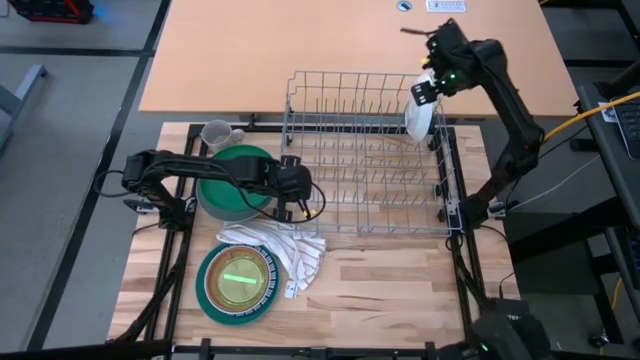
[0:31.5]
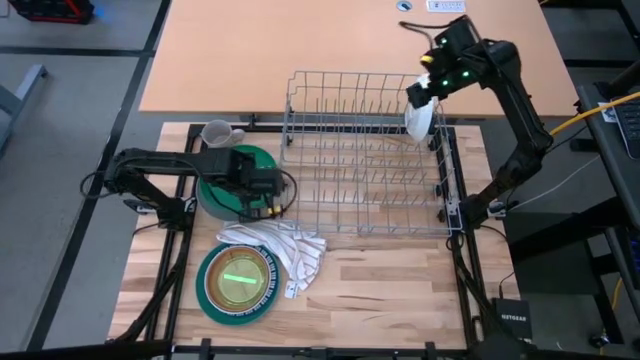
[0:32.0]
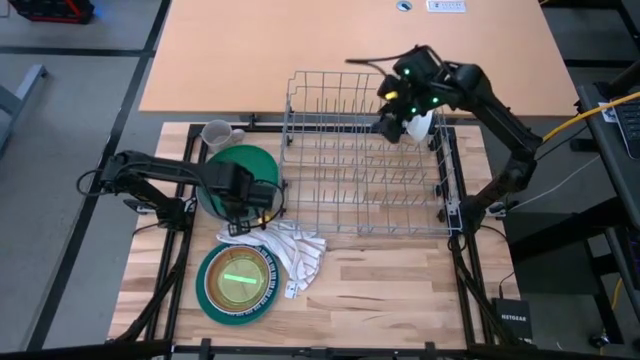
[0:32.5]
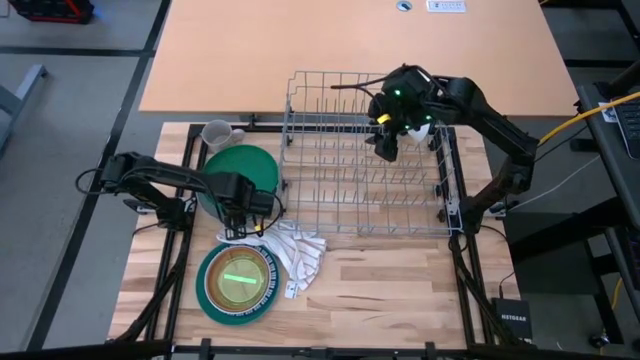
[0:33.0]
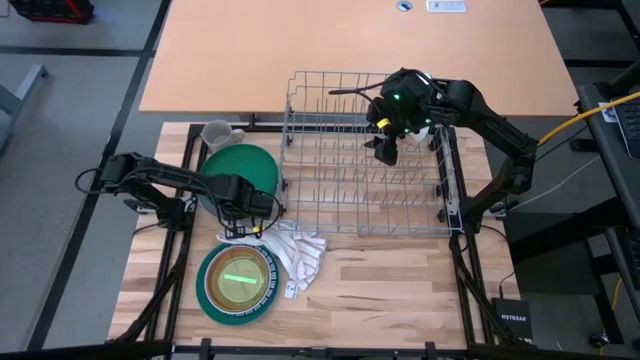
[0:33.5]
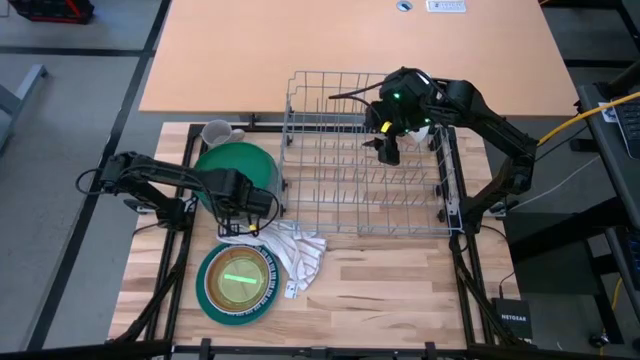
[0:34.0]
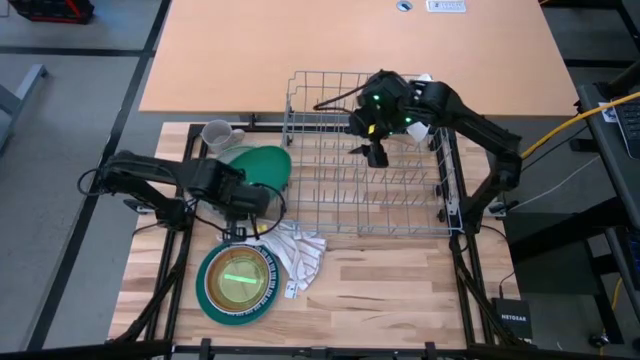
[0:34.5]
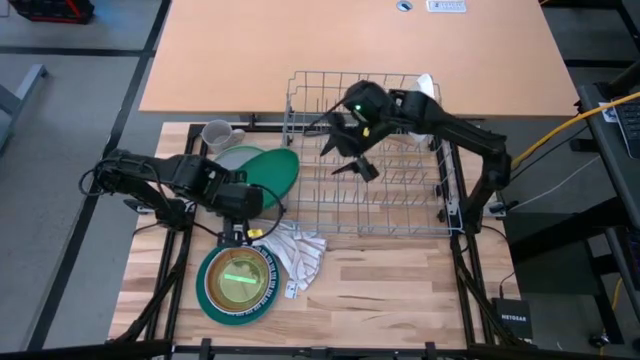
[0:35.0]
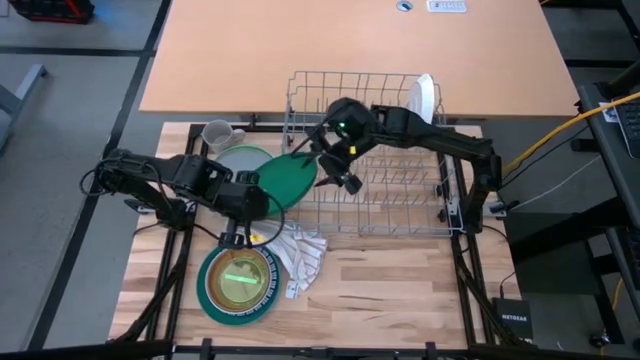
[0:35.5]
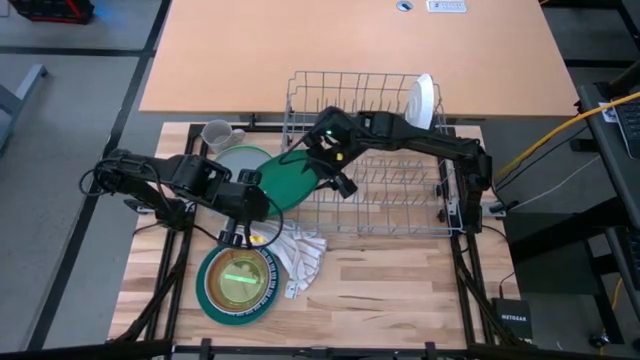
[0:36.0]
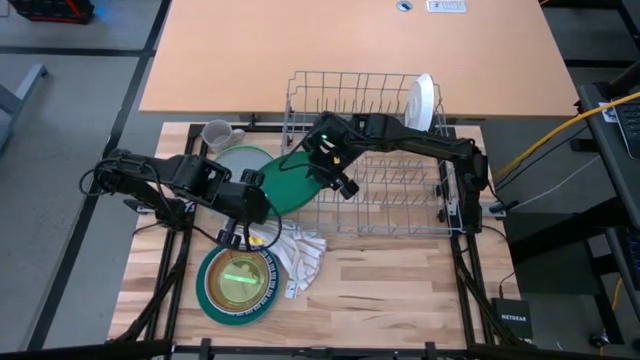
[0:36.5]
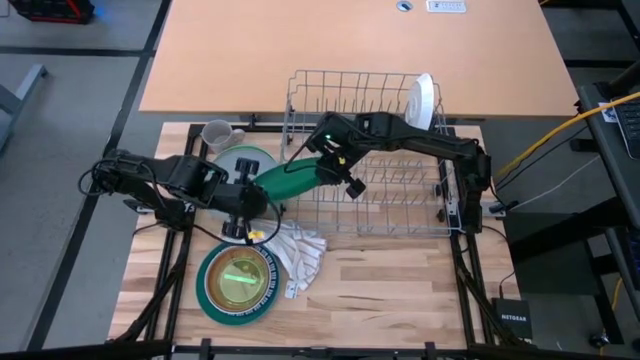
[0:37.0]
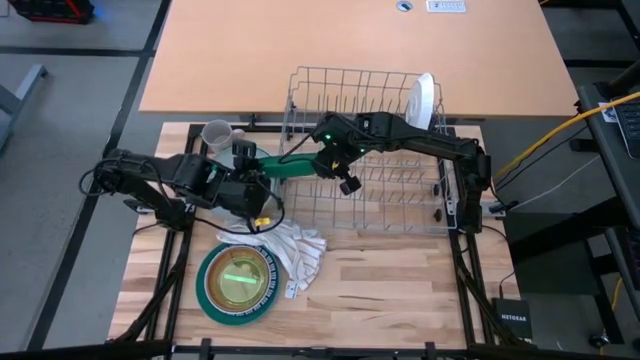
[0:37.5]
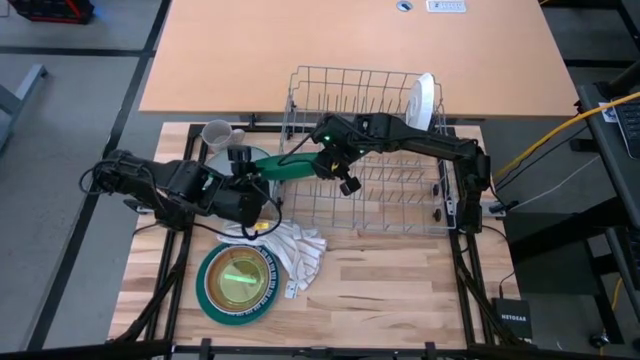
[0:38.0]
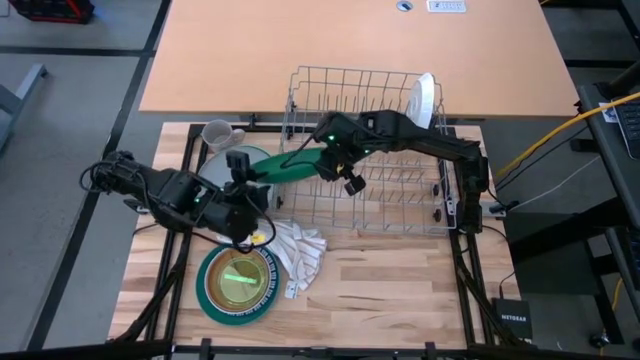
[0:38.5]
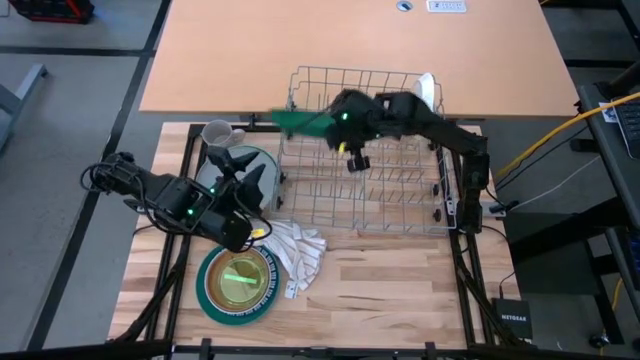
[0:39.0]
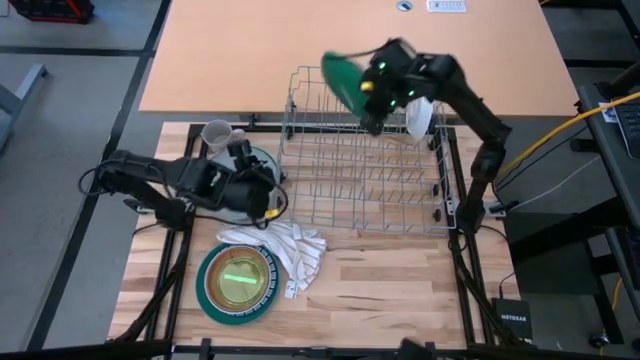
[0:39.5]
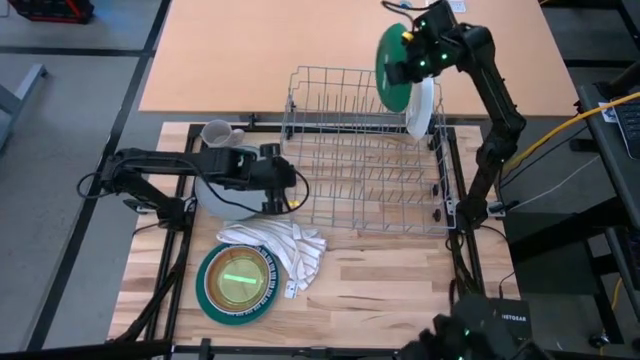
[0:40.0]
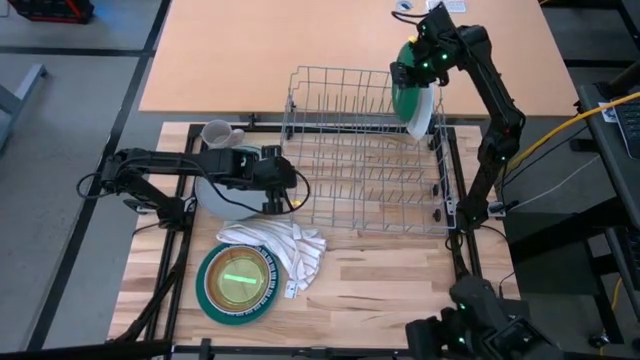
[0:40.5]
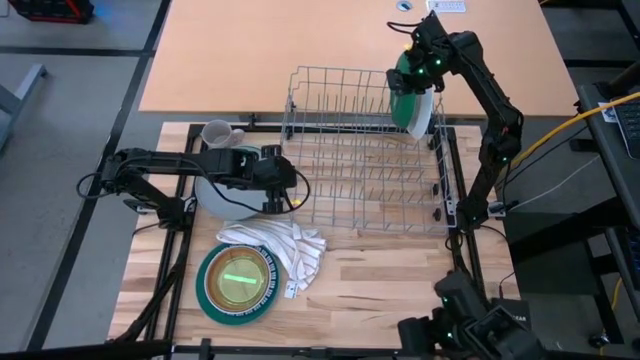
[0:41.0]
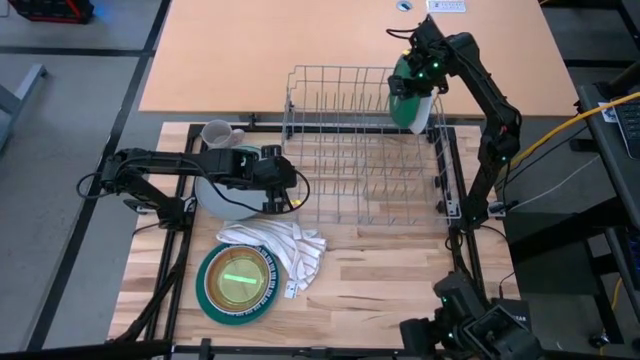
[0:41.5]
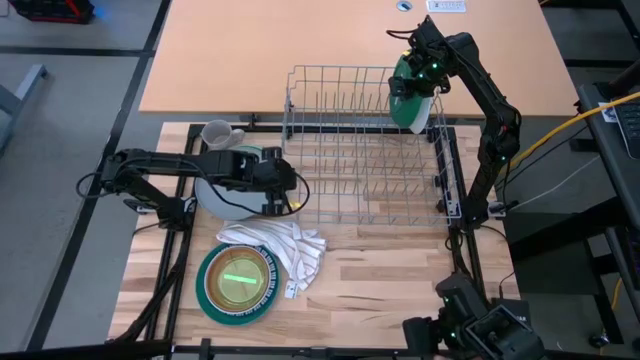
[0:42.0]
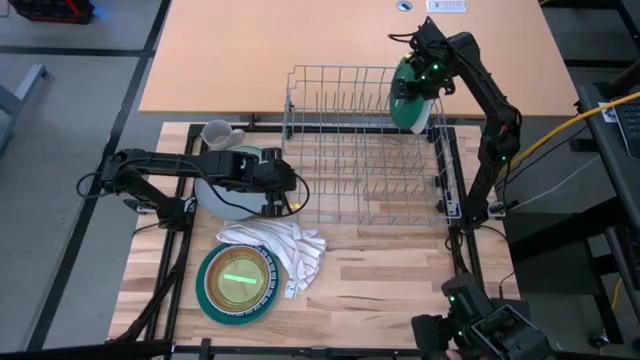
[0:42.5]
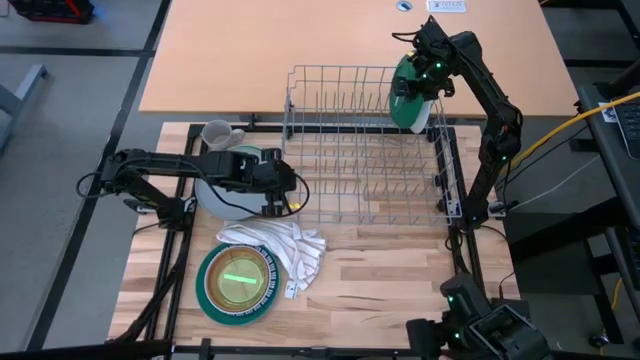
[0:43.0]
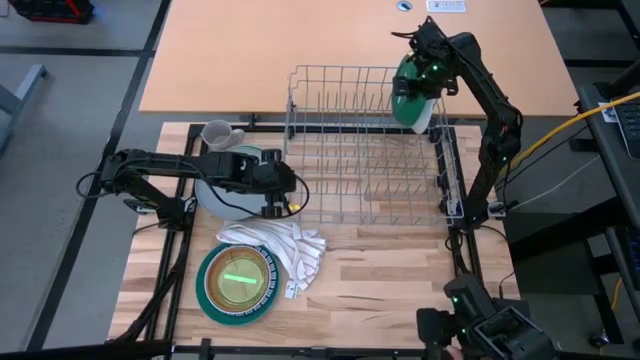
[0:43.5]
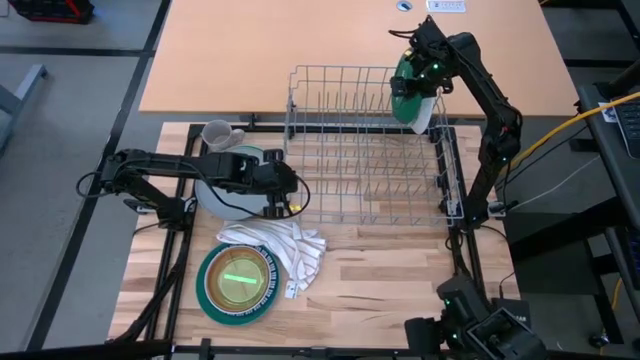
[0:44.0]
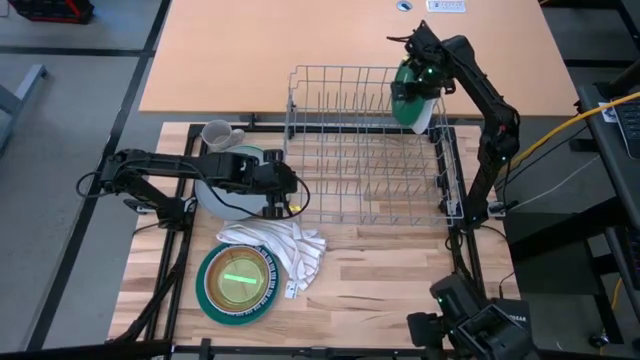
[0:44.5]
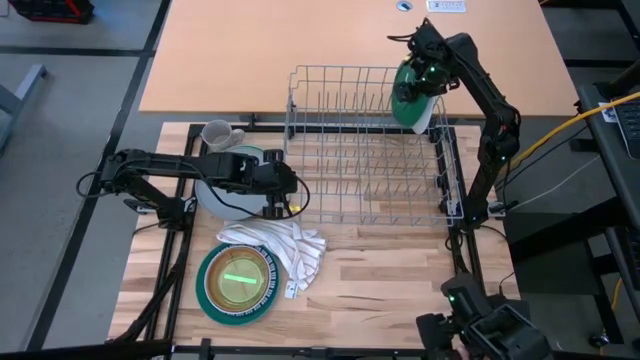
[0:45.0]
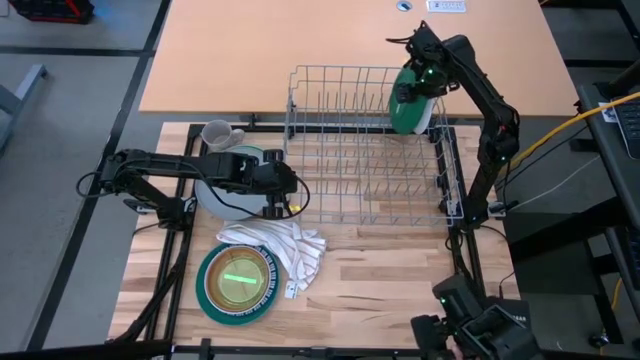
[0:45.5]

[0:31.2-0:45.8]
Task: Sort dishes
Put the green plate into the dish rack

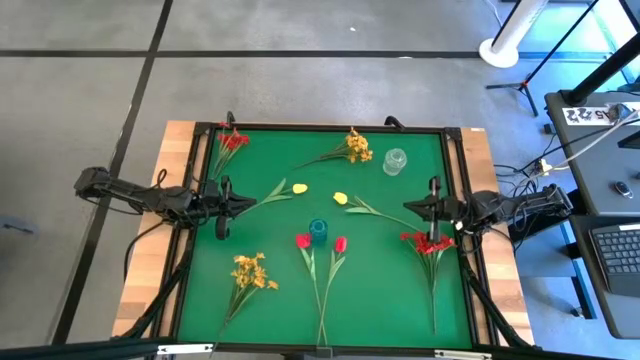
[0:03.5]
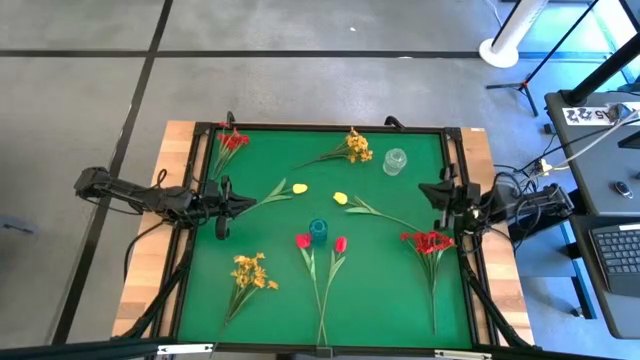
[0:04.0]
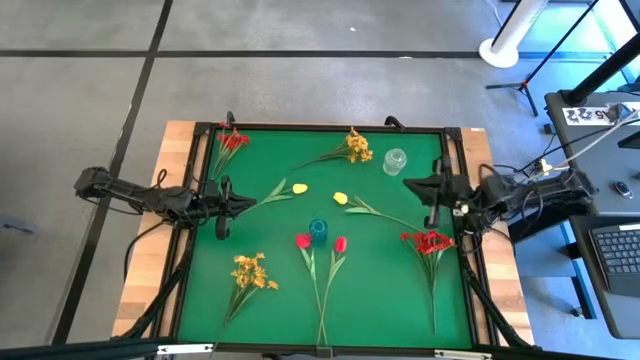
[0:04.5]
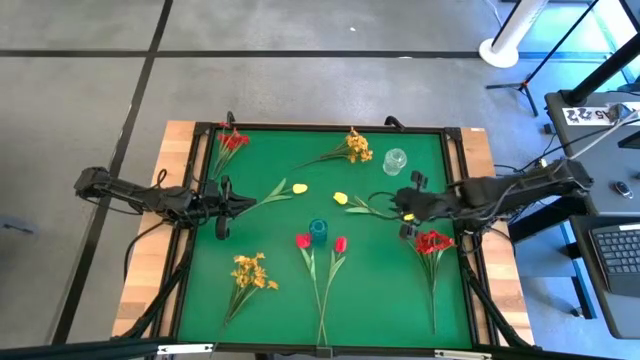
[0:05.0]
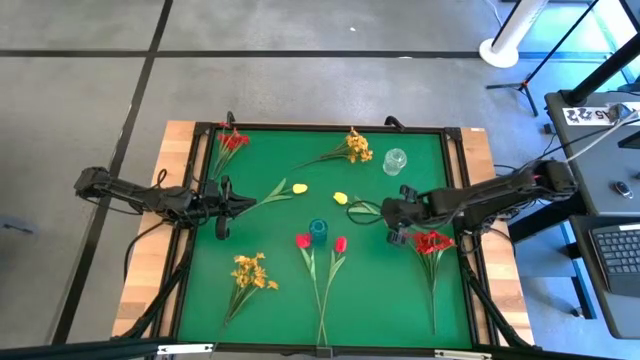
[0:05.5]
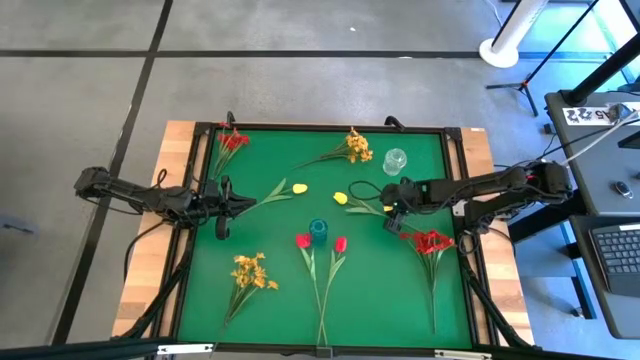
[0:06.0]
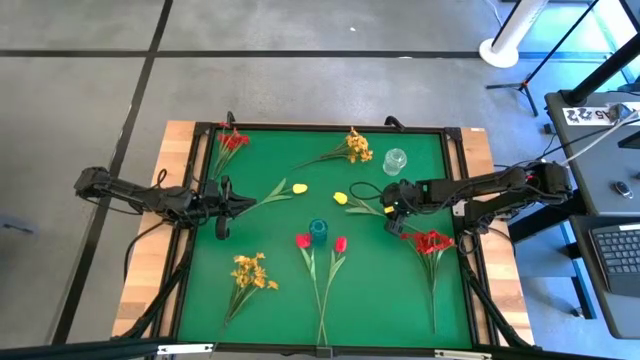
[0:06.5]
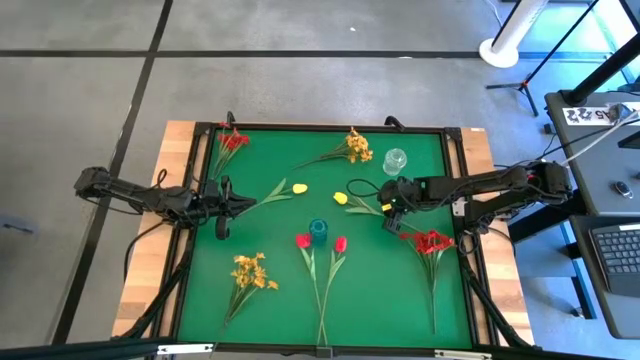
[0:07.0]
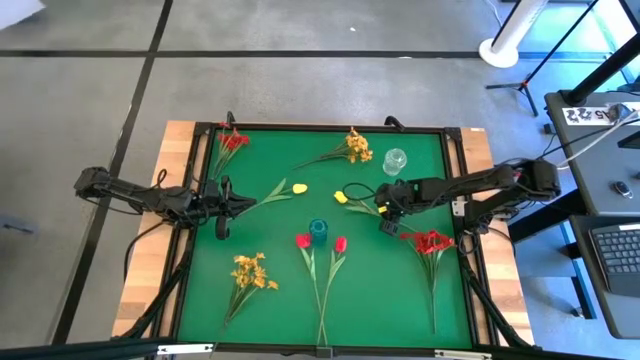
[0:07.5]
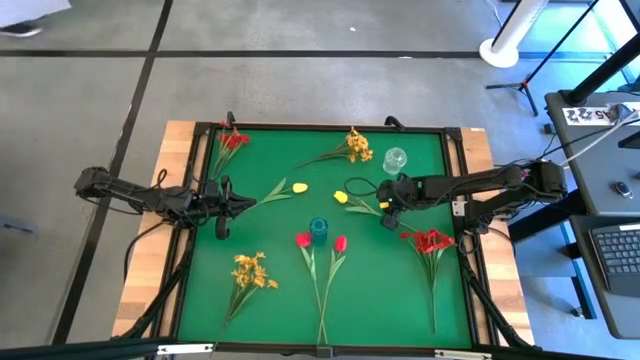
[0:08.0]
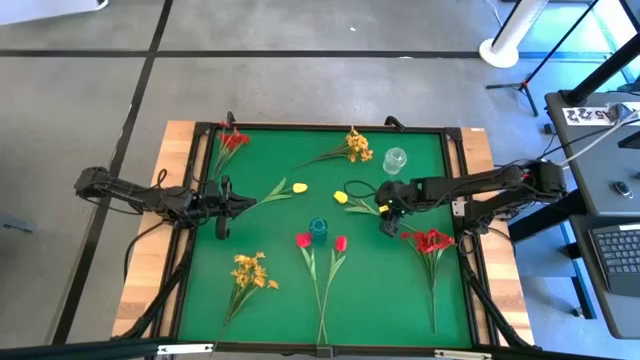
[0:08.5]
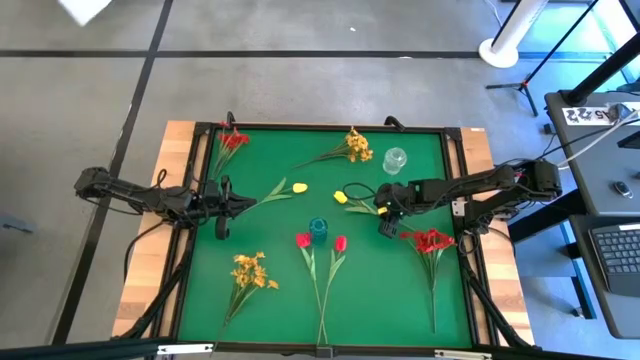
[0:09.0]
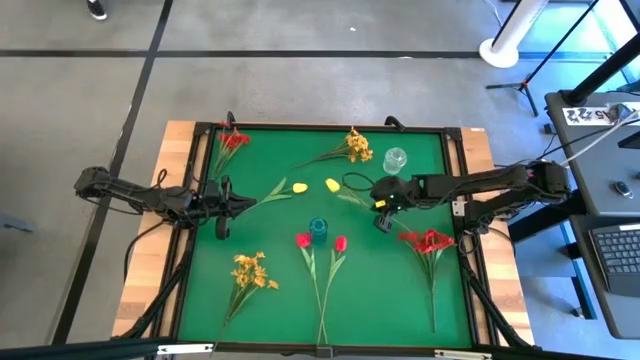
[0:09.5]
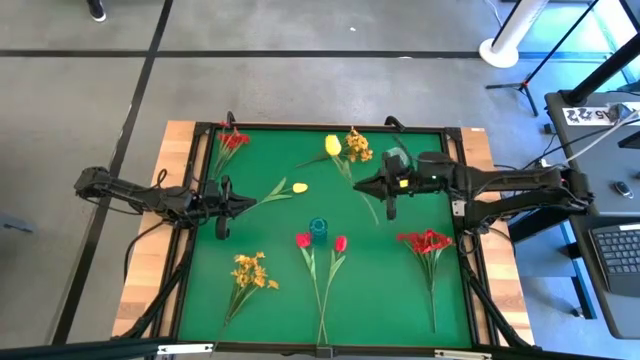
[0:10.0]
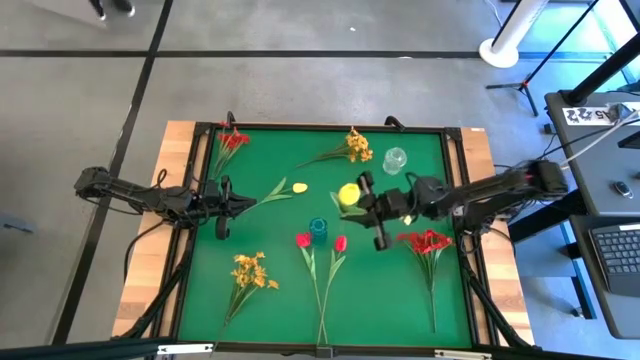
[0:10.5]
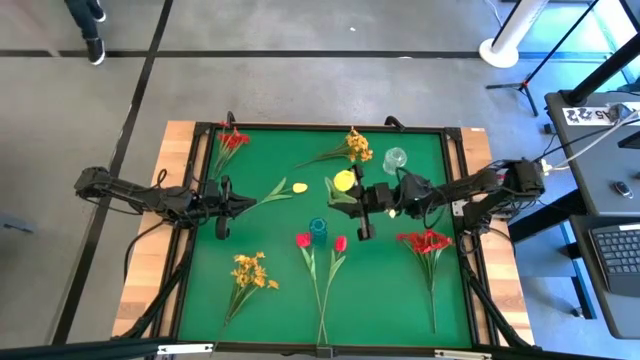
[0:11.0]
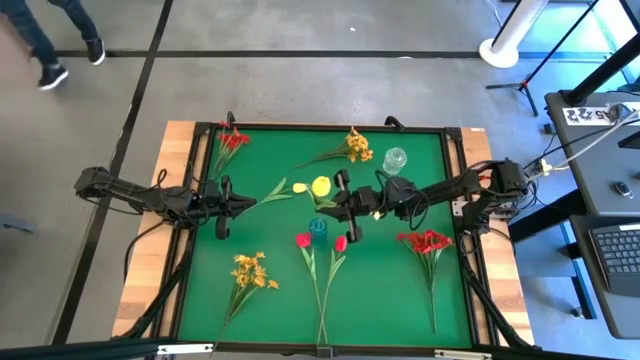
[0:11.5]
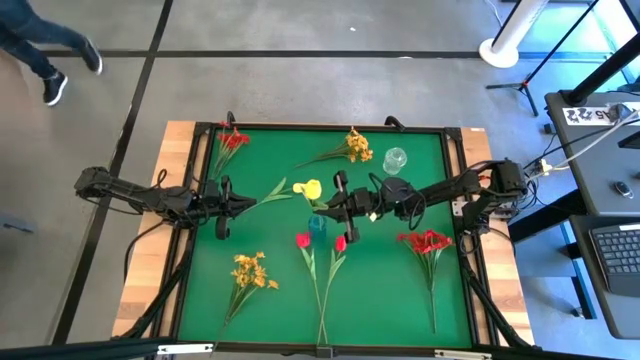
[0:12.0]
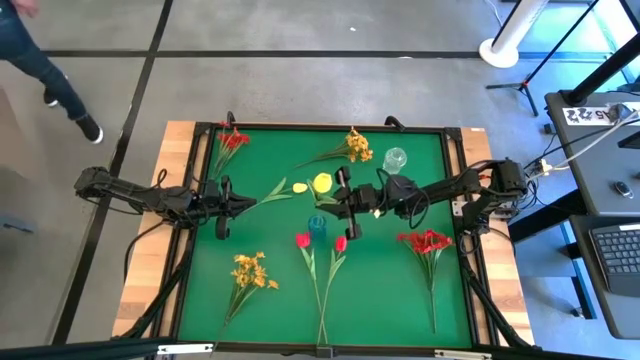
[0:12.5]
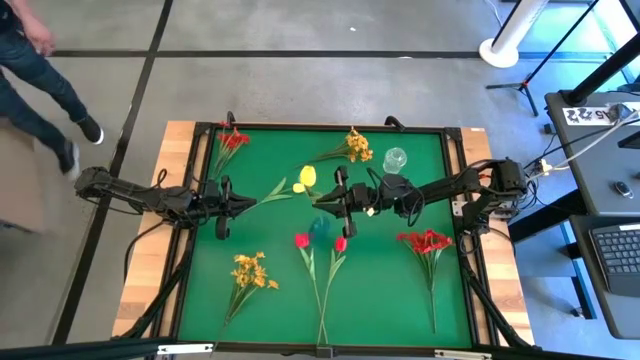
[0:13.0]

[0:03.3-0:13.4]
Task: Sort flowers into vase by color
Put the yellow flower into the blue vase
